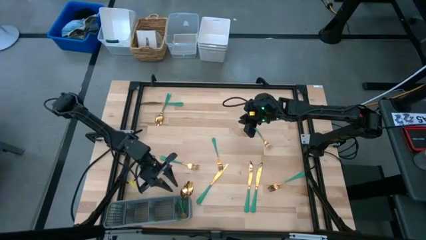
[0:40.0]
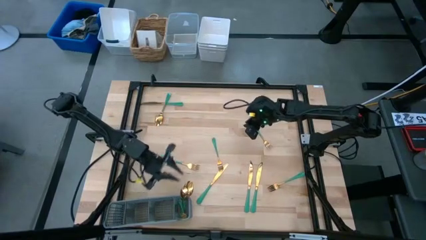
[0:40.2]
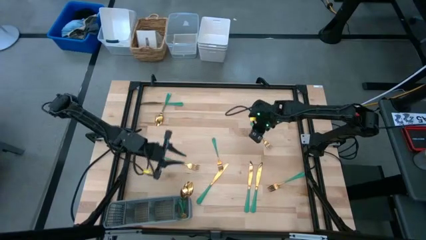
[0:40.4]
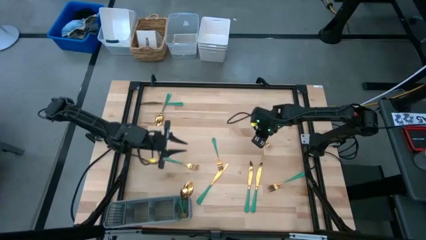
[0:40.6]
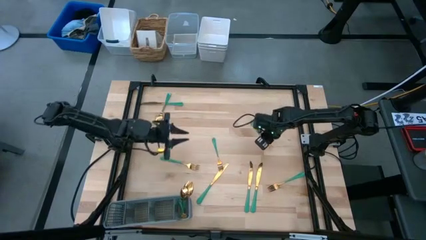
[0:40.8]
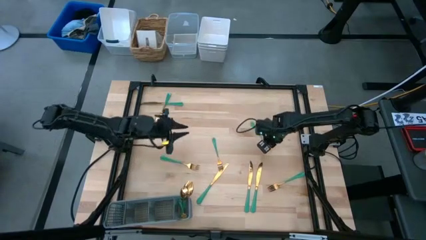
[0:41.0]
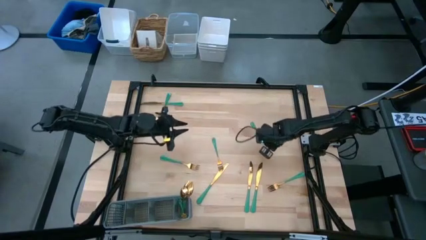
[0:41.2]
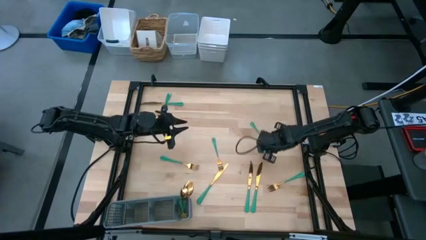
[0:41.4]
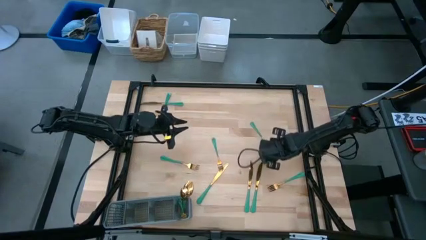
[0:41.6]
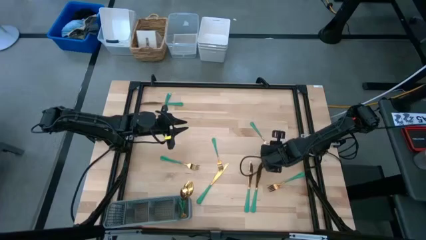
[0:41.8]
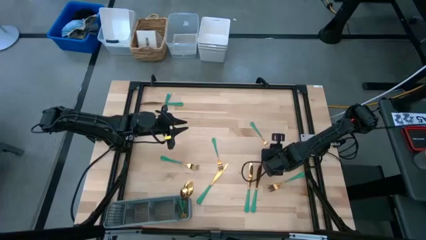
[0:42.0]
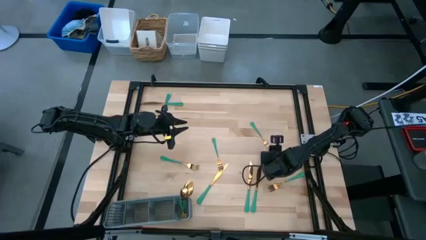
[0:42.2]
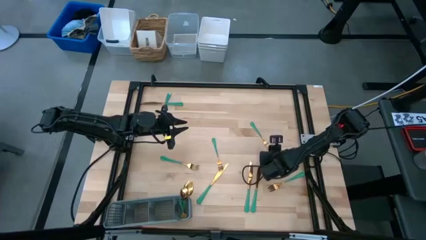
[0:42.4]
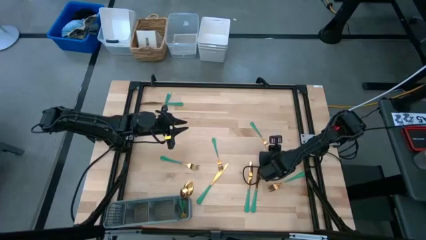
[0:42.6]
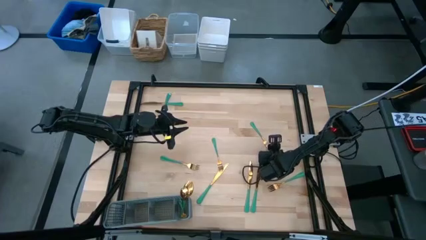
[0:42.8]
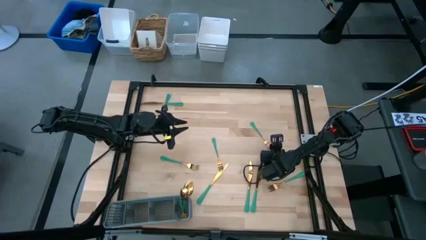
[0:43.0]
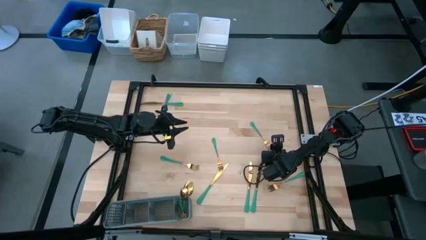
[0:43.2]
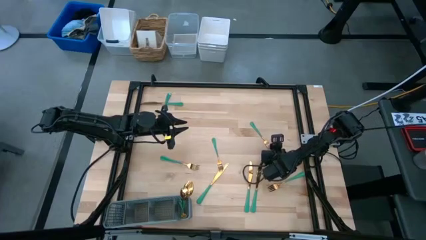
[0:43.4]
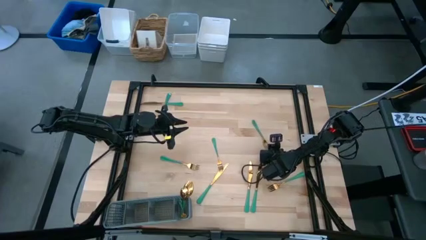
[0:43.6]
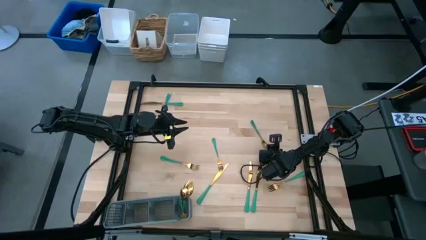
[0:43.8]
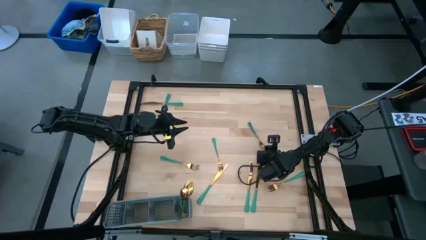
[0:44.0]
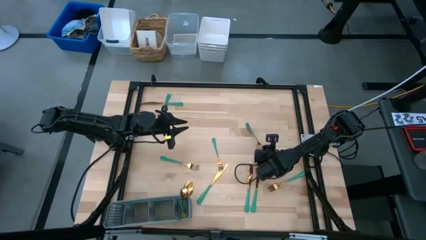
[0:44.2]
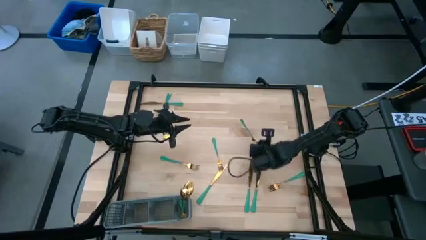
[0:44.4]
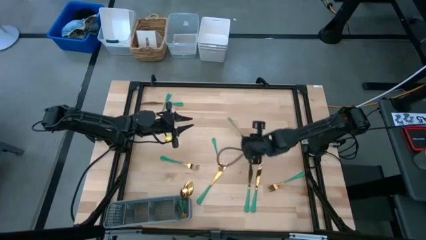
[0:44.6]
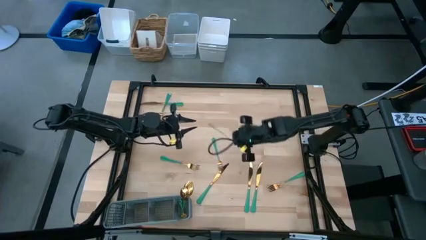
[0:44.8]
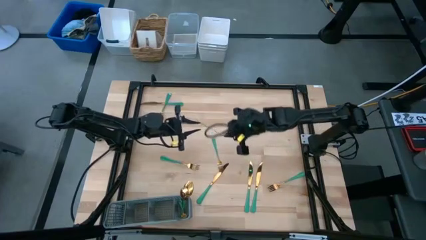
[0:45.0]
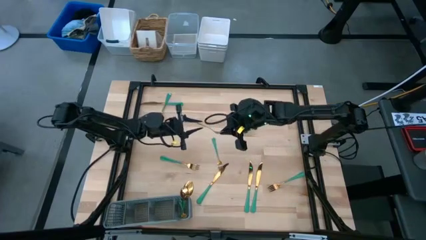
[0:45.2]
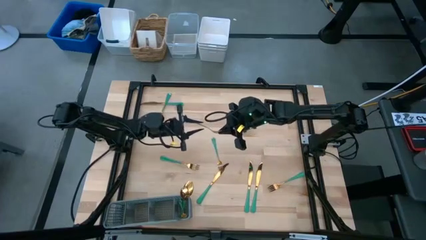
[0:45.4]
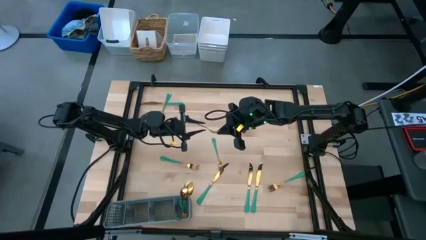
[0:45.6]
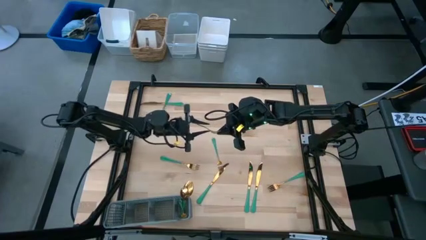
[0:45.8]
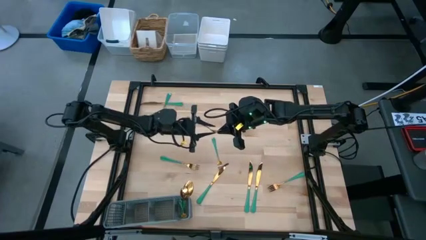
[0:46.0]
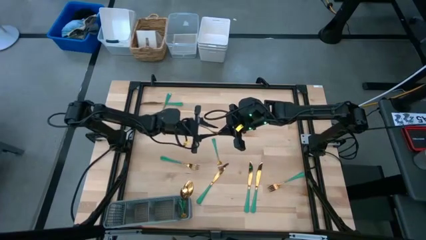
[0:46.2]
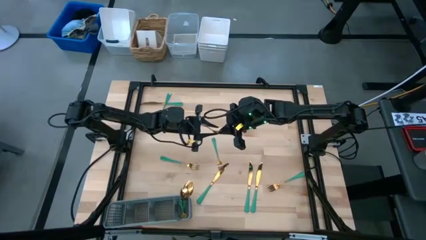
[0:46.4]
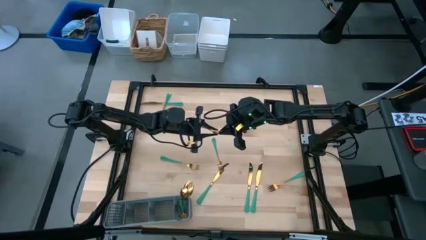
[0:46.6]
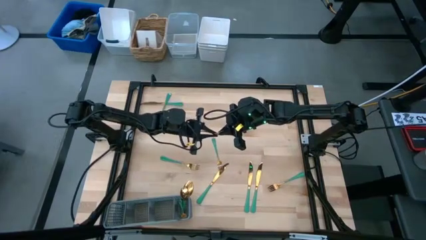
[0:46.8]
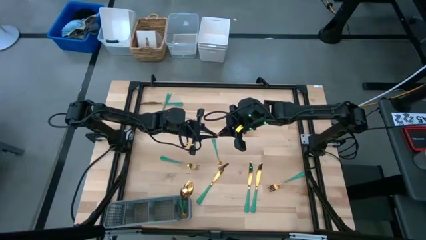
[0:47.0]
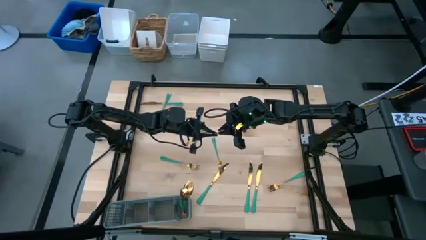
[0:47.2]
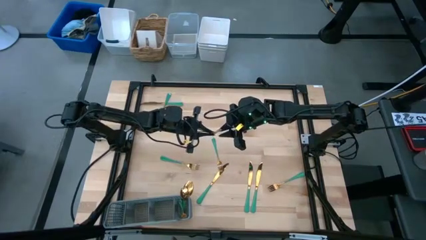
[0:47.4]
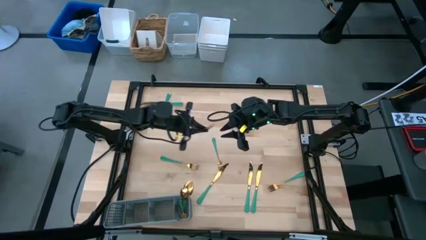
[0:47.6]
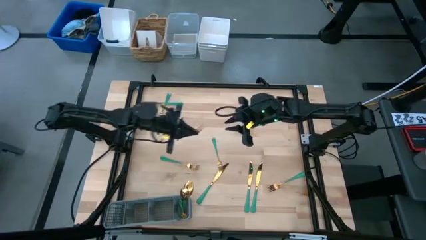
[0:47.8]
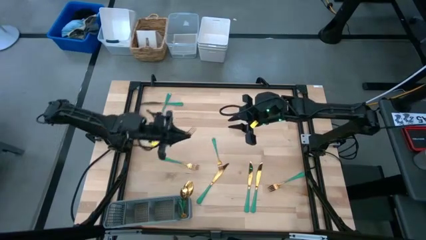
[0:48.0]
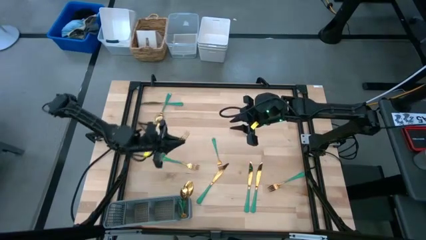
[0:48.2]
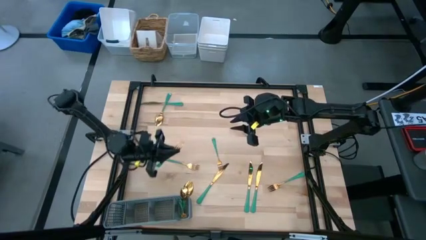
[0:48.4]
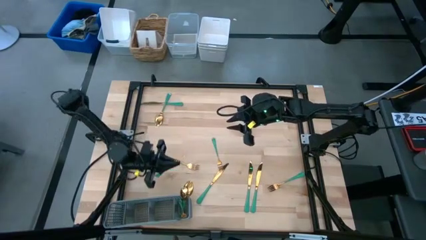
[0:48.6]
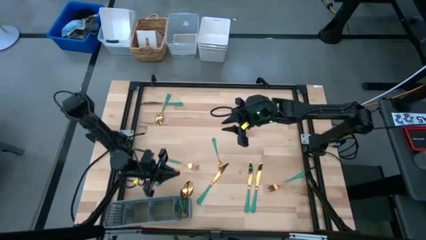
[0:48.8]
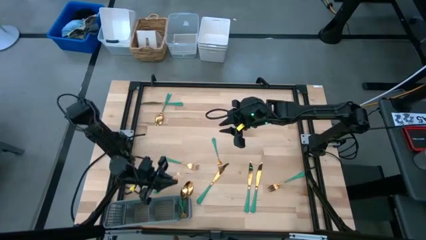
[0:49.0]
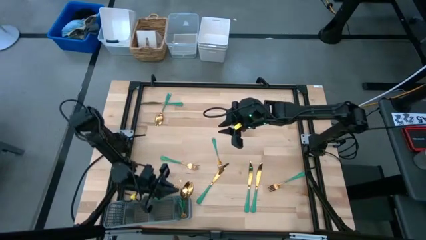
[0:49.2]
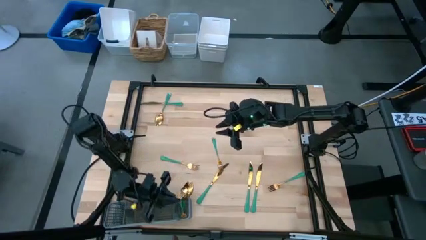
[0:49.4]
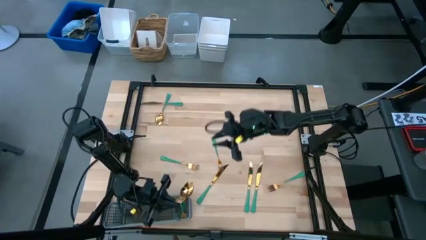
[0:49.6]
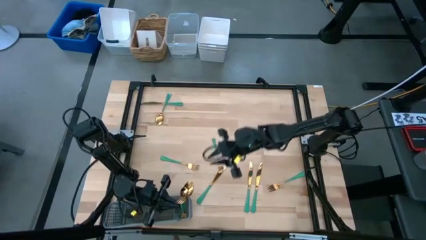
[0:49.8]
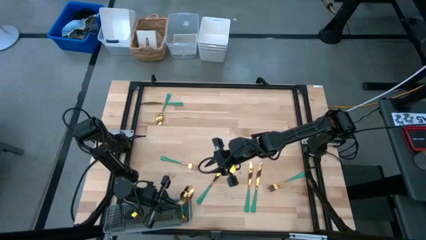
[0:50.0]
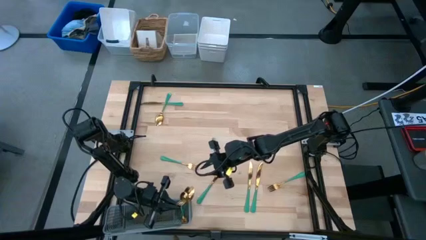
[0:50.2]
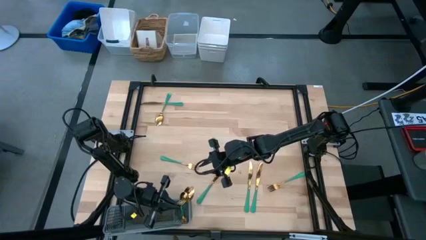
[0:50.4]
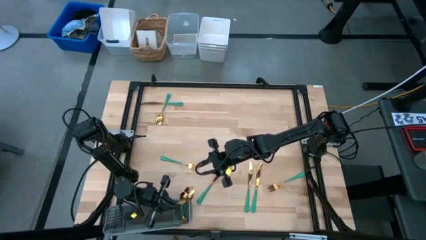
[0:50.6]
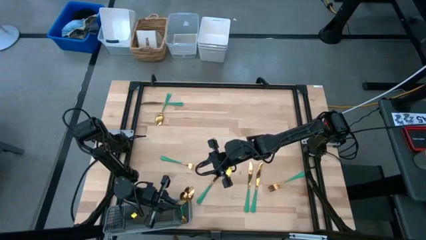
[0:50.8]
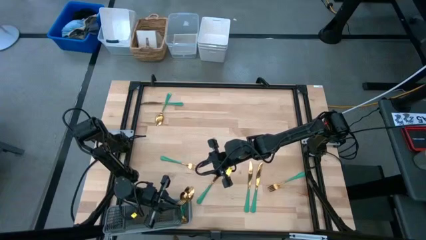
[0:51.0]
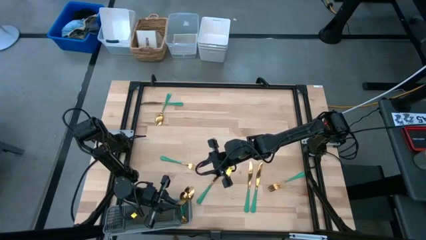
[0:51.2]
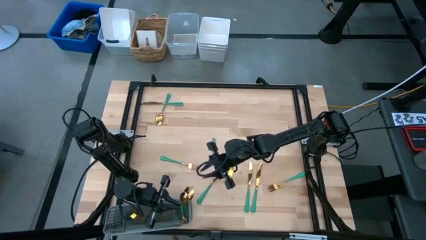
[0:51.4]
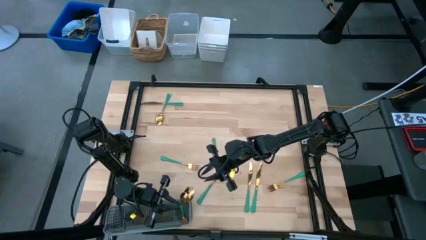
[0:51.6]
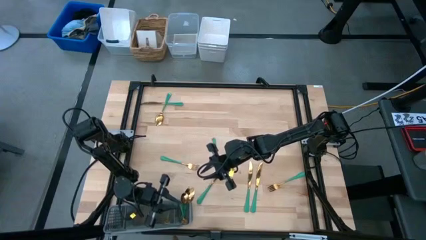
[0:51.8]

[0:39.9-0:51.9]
Task: Sort silverware
Put the top fork into the cutlery rack
